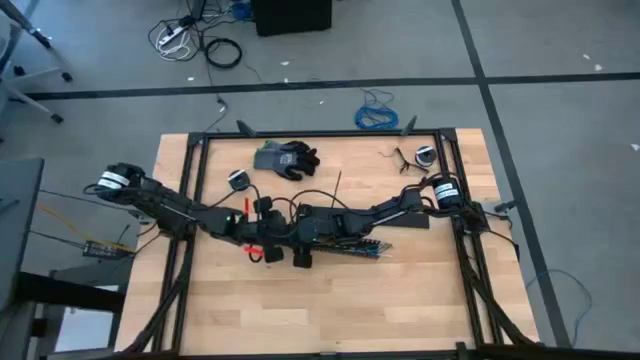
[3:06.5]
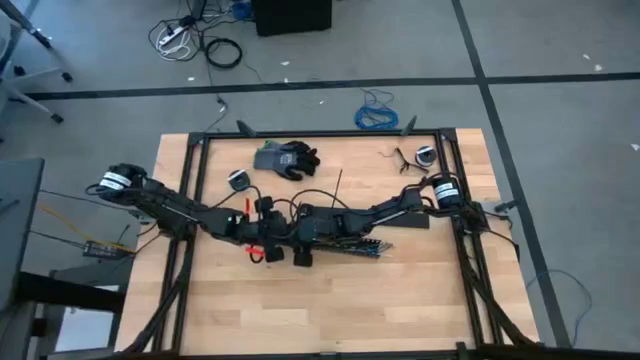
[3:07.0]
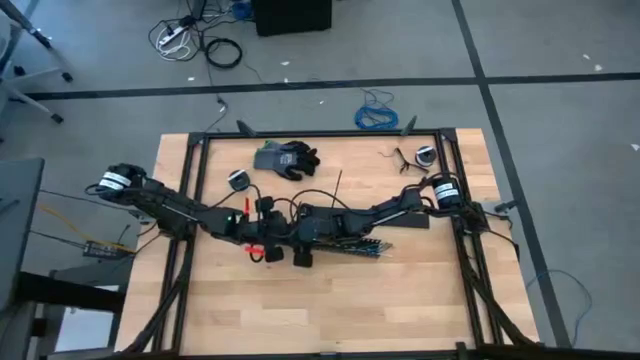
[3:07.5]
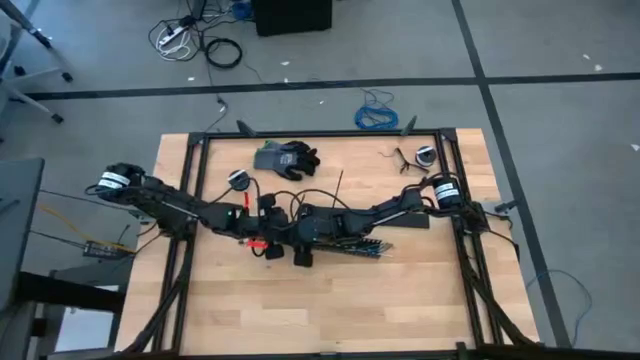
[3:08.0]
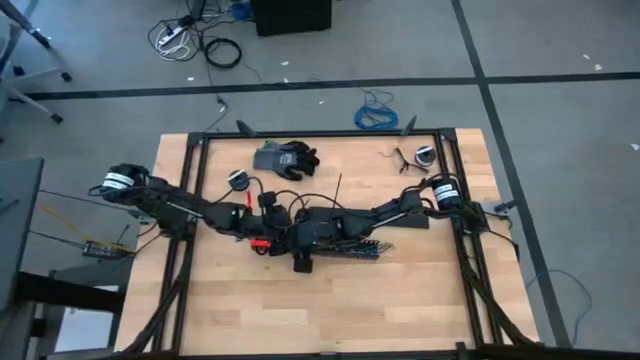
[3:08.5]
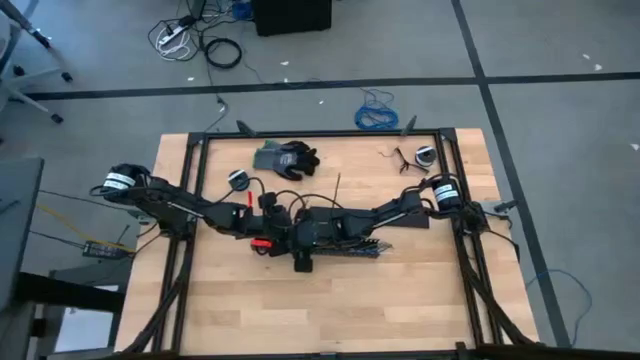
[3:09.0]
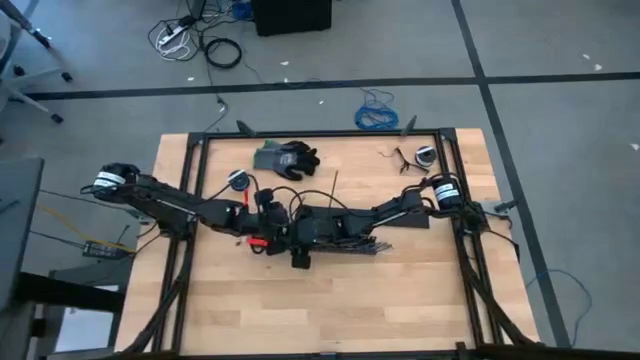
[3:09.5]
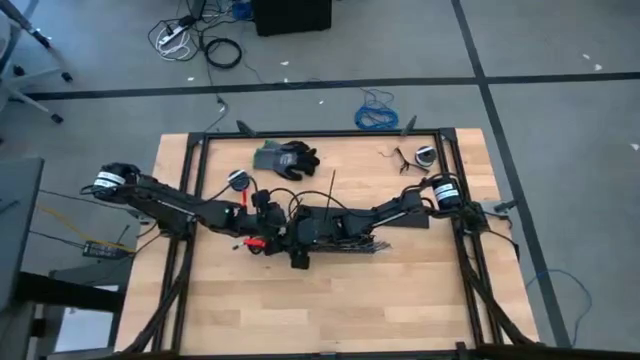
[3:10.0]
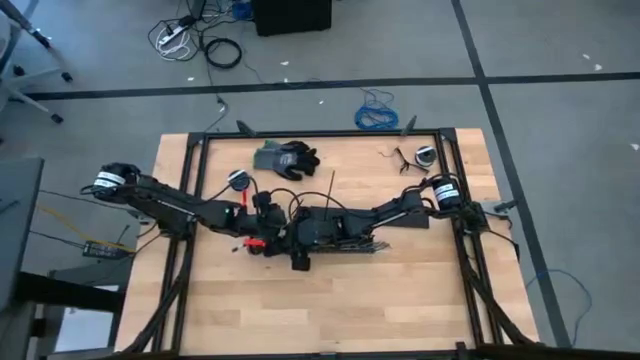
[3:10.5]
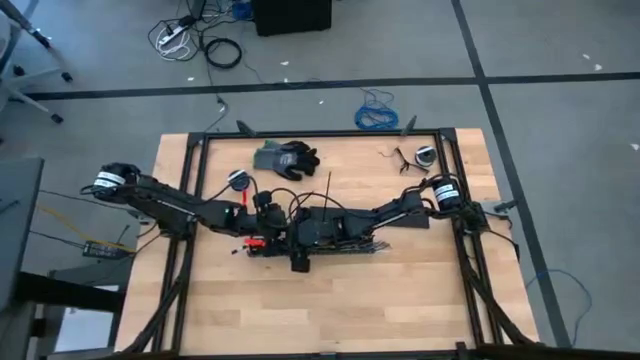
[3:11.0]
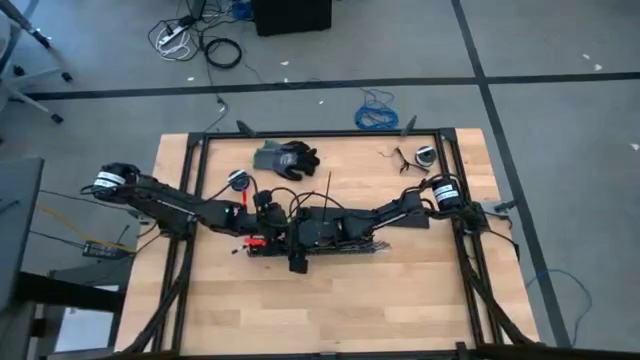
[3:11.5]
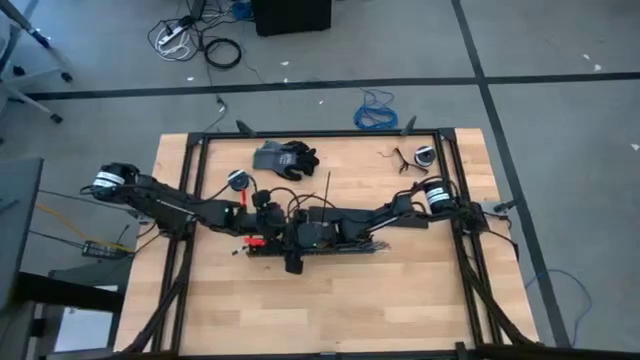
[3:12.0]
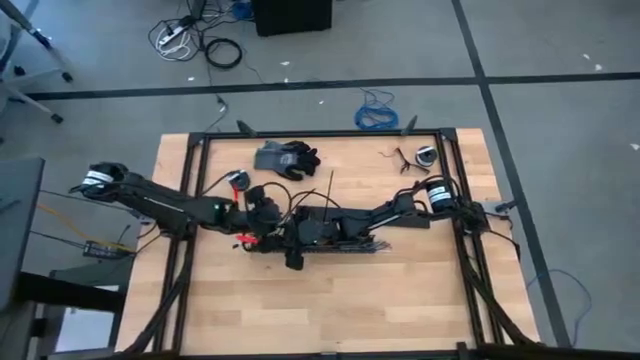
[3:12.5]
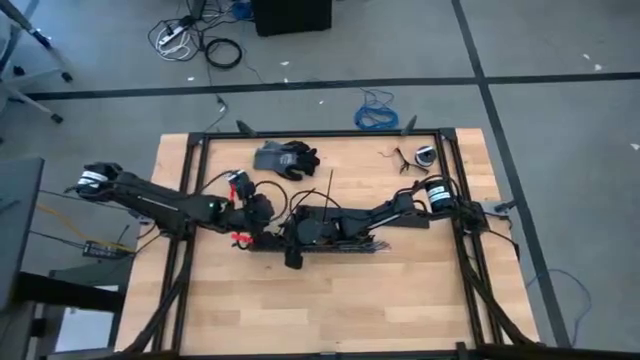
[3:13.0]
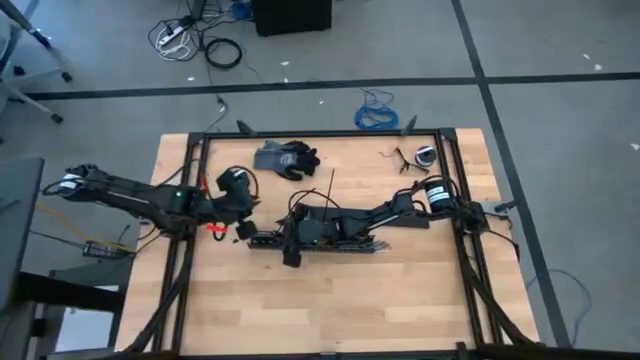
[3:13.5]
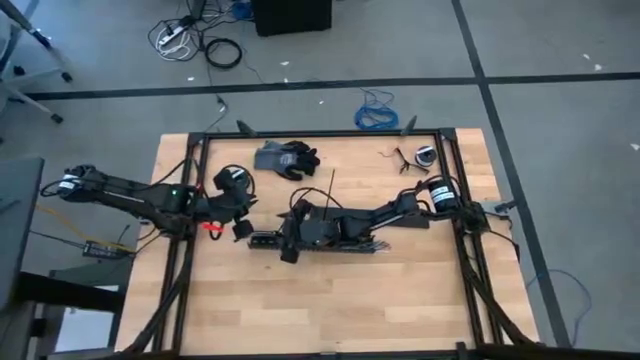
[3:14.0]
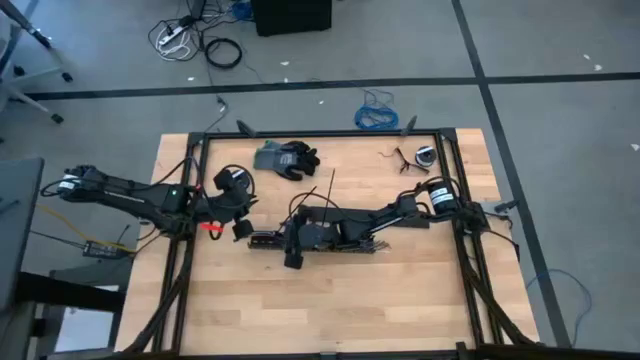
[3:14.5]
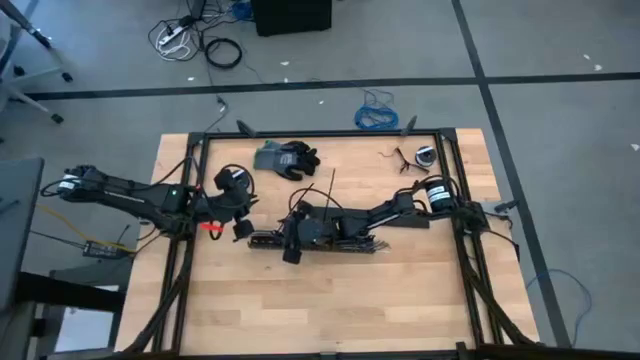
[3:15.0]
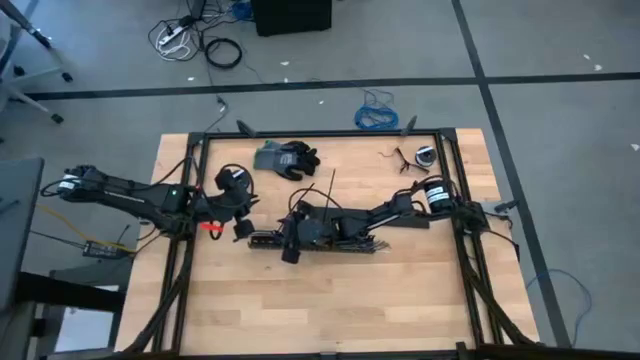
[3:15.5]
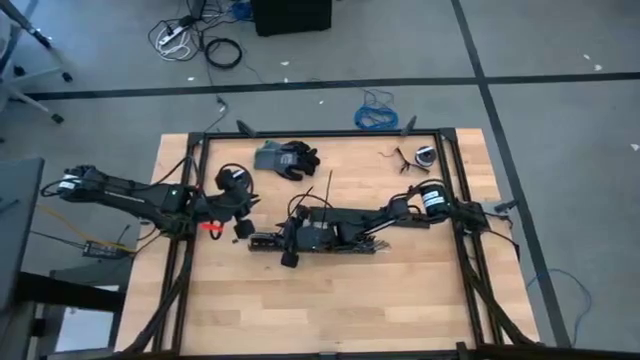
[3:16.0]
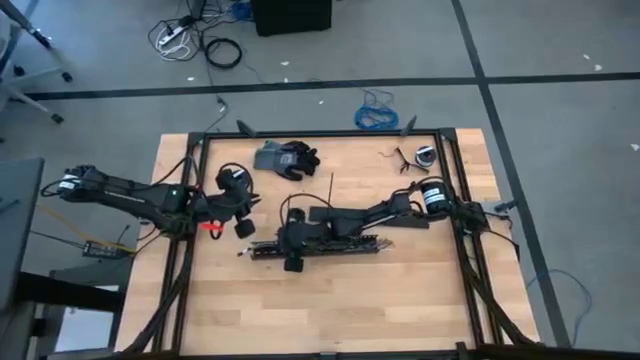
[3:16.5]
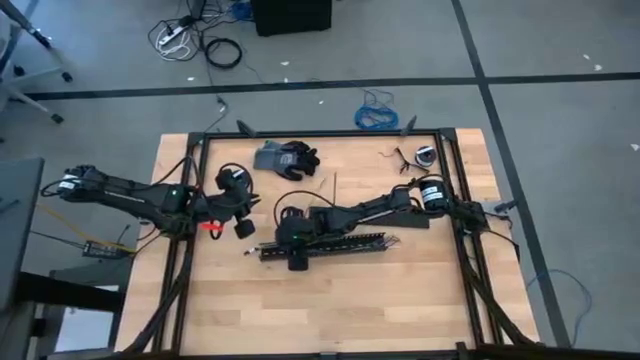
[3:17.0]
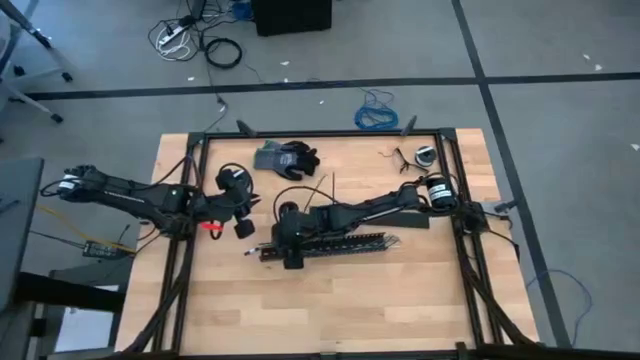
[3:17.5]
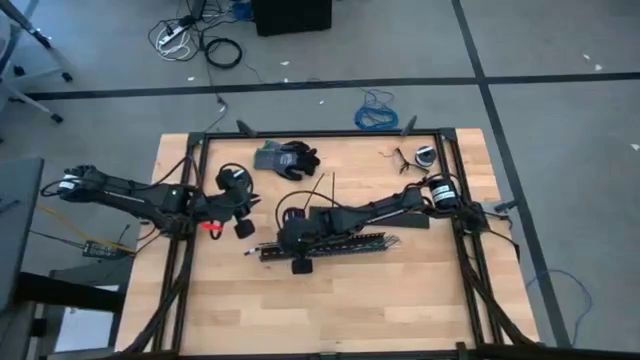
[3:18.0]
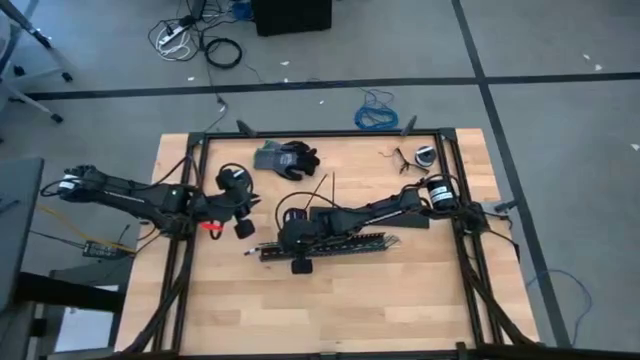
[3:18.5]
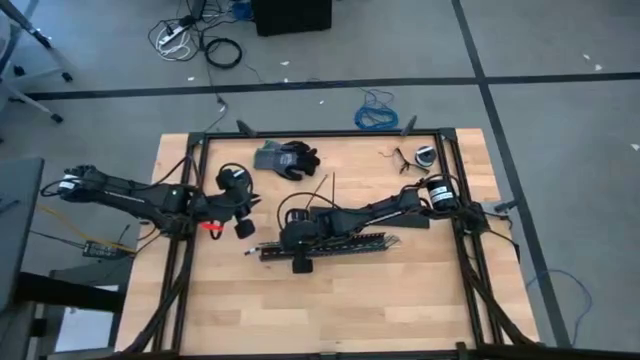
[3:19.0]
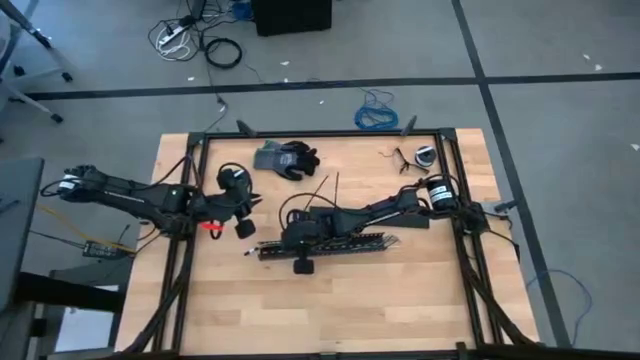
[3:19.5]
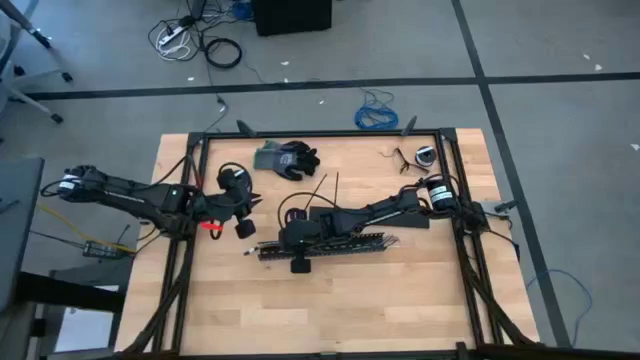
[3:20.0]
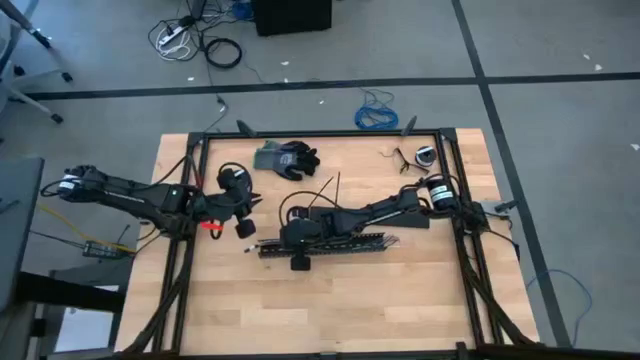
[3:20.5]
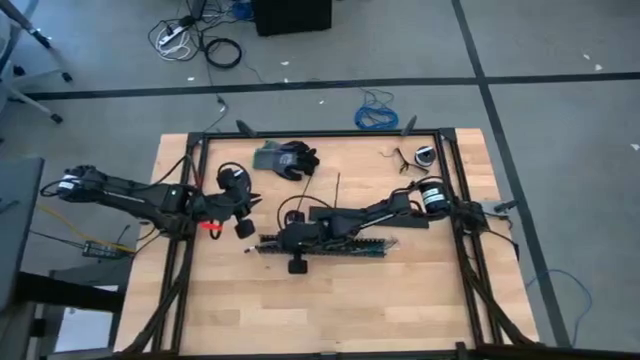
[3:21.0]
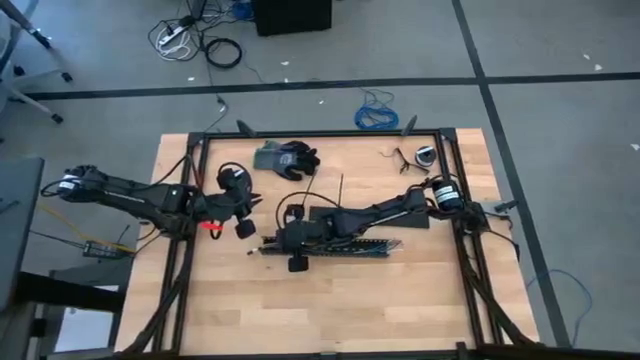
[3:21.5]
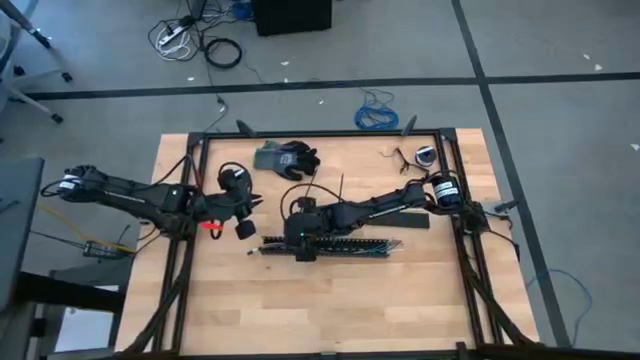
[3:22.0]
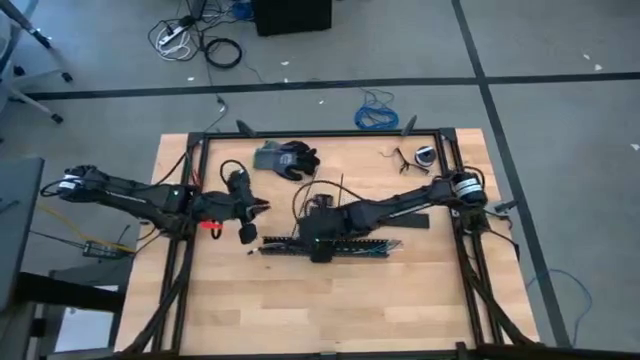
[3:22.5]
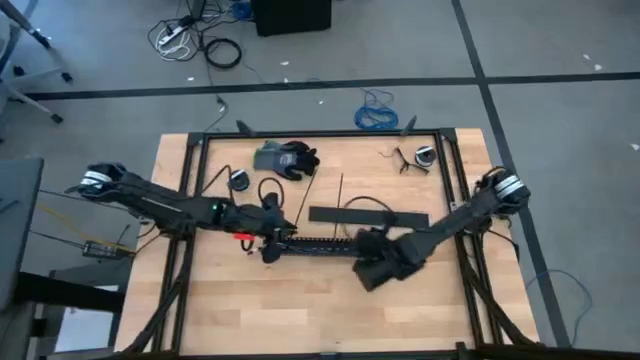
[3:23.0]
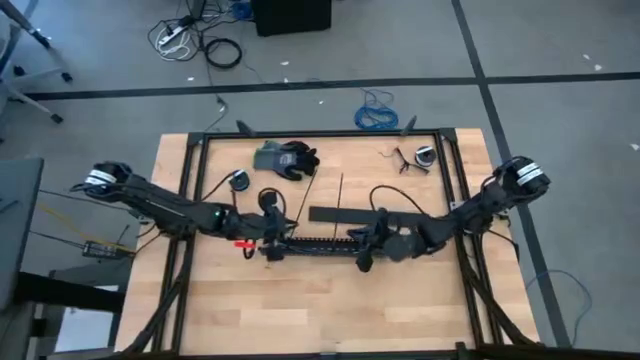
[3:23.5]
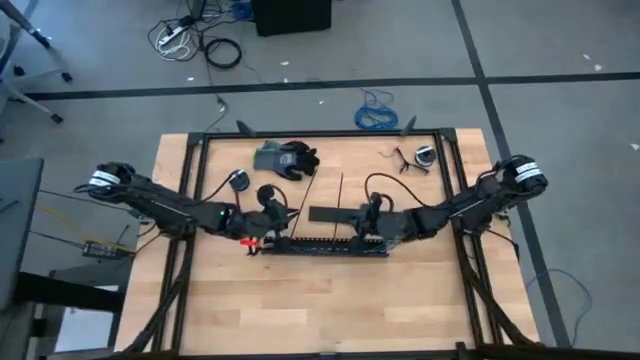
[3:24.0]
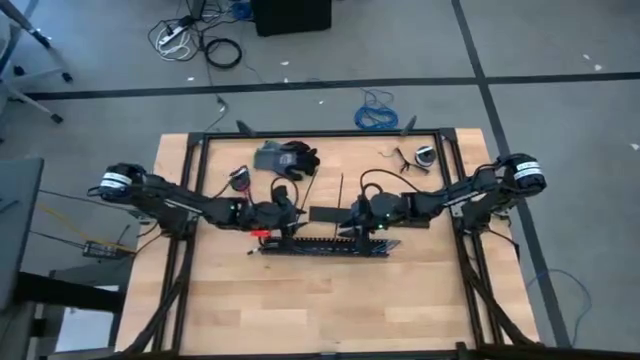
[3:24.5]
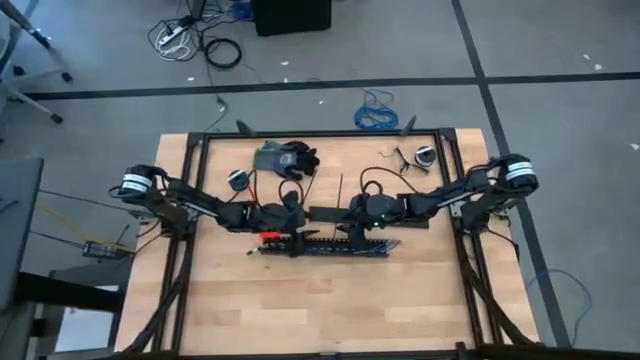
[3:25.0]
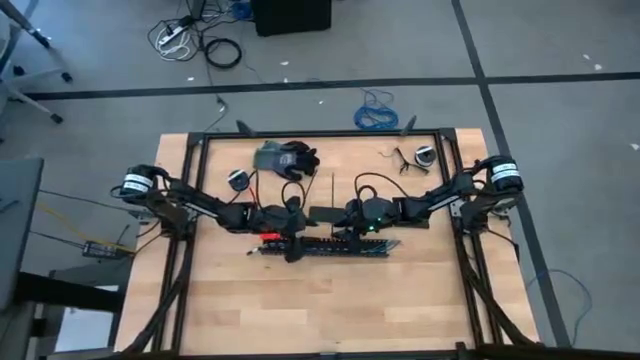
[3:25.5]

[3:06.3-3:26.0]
Task: Ziptie cables
Put the cable wires in the black cable duct

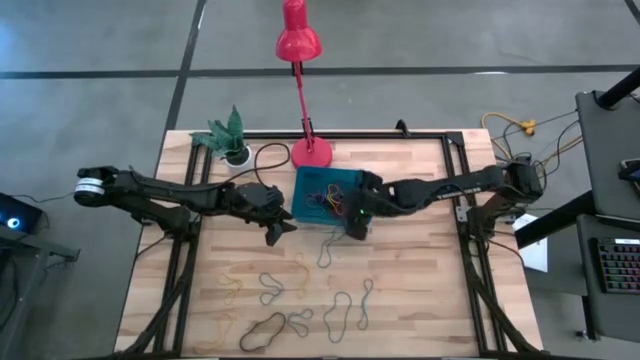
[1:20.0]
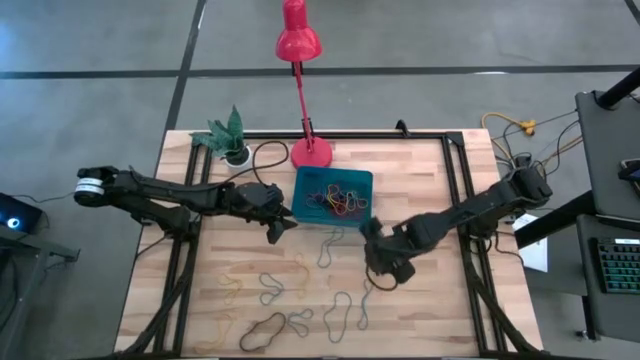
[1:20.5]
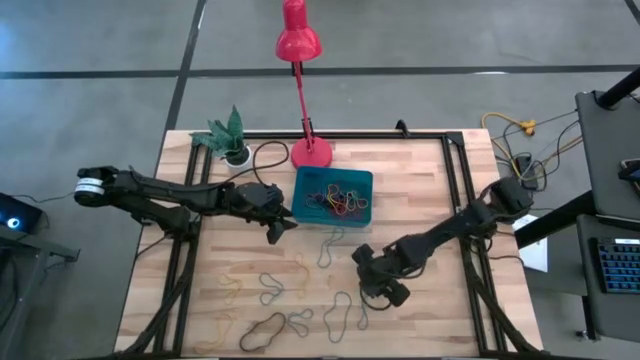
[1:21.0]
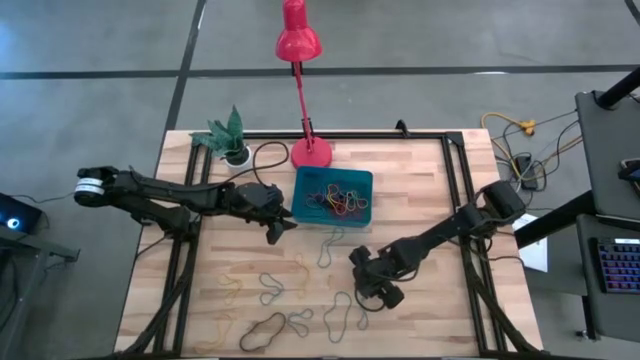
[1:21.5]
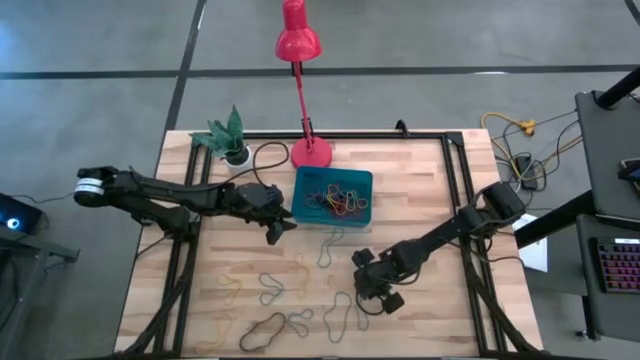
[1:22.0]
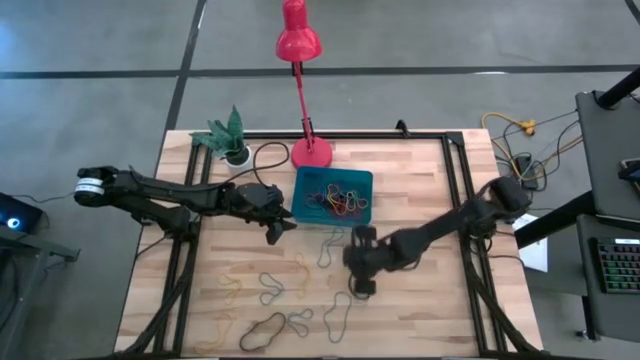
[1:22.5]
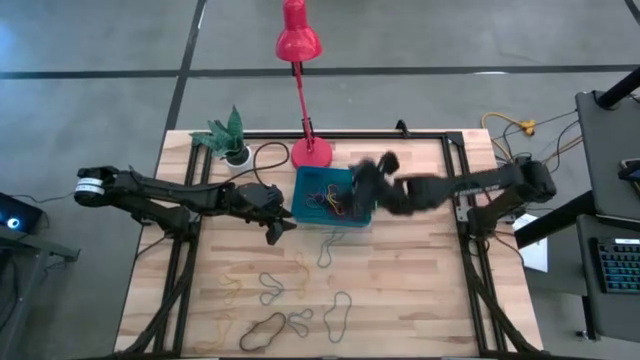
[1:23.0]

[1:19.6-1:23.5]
Task: Pick and place rubber bands into bin
Put the blue rubber band into the blue bin
